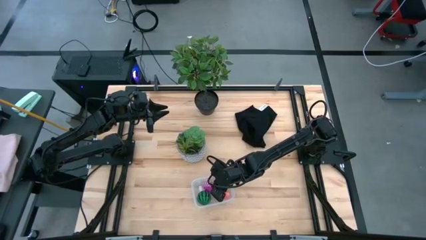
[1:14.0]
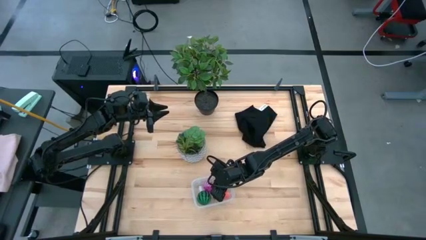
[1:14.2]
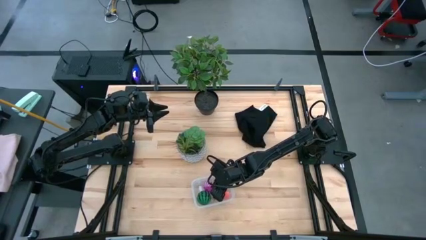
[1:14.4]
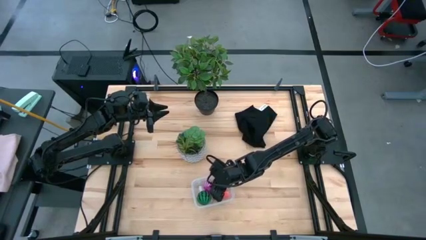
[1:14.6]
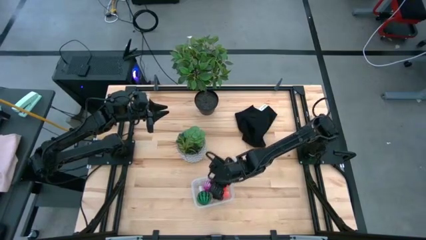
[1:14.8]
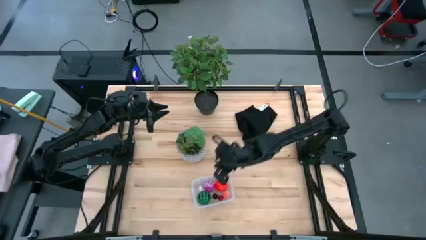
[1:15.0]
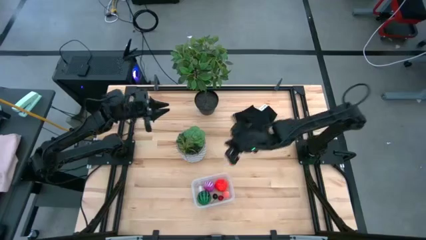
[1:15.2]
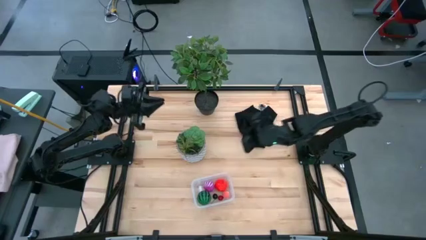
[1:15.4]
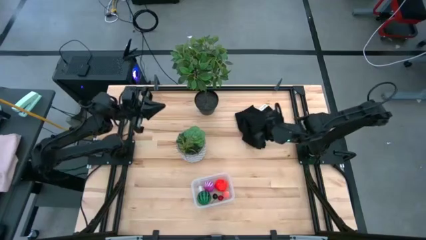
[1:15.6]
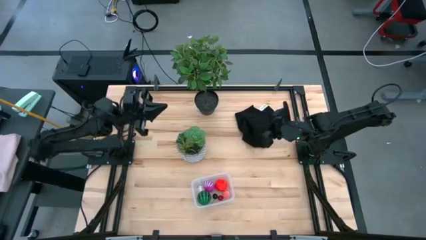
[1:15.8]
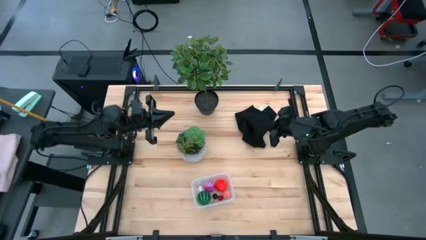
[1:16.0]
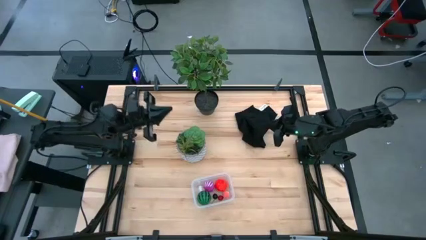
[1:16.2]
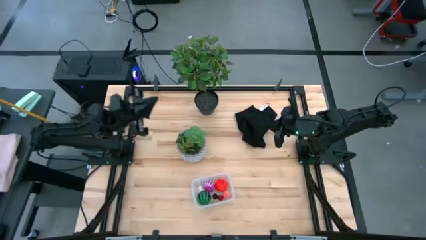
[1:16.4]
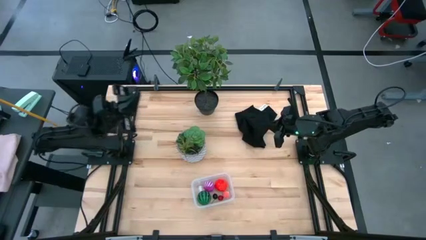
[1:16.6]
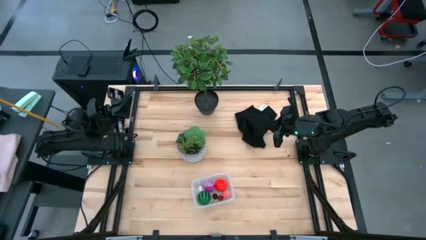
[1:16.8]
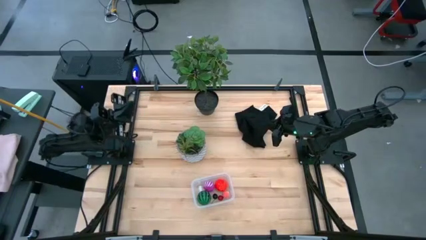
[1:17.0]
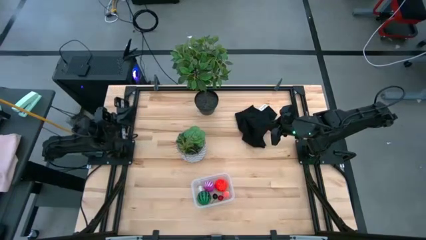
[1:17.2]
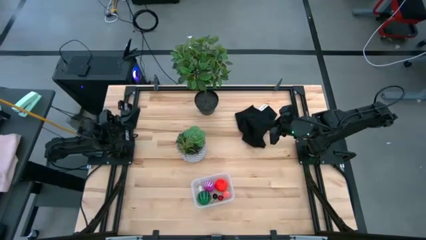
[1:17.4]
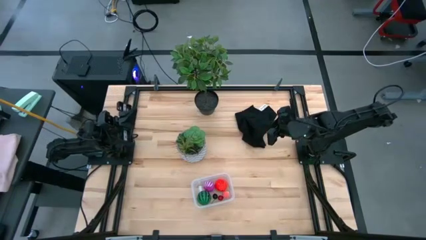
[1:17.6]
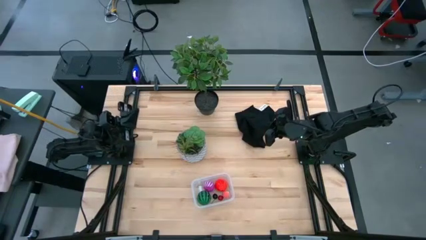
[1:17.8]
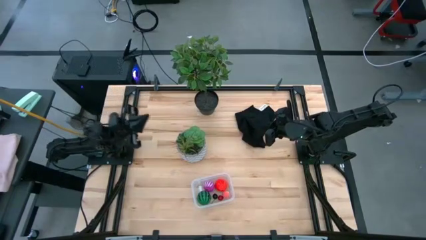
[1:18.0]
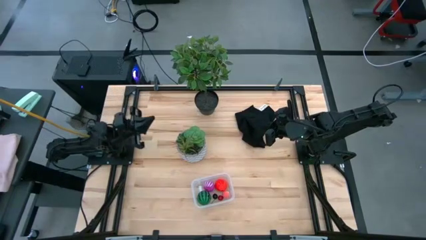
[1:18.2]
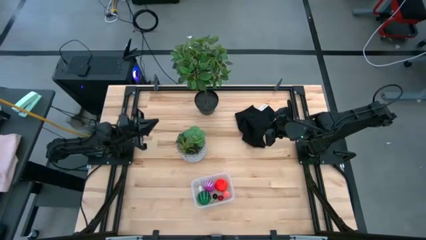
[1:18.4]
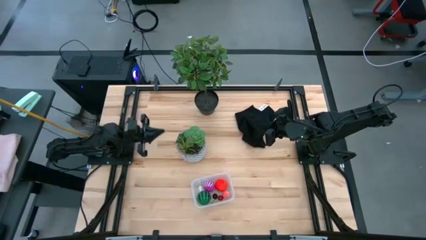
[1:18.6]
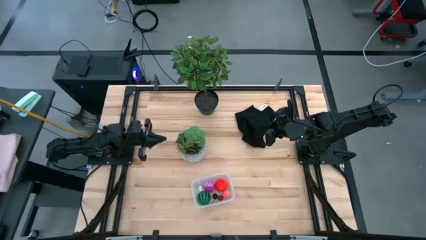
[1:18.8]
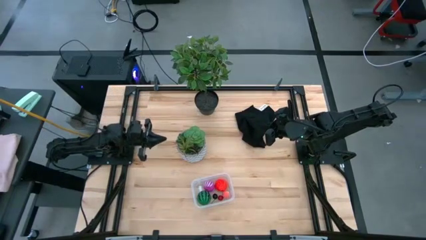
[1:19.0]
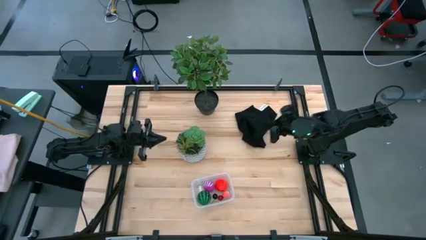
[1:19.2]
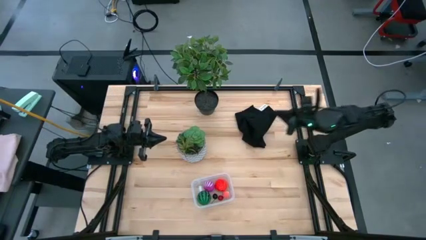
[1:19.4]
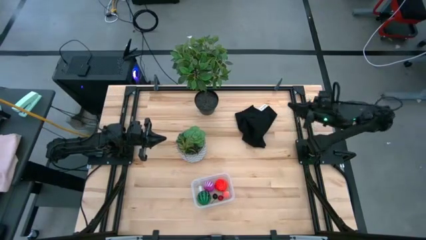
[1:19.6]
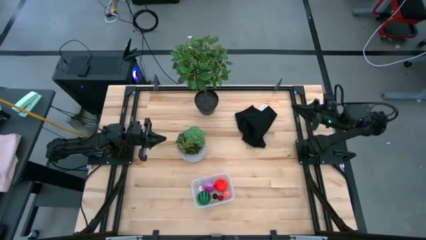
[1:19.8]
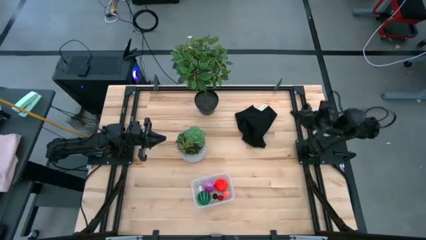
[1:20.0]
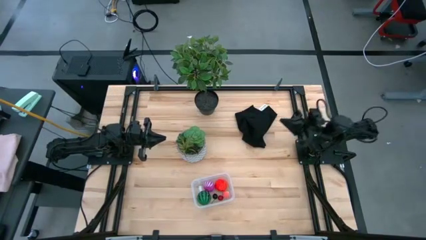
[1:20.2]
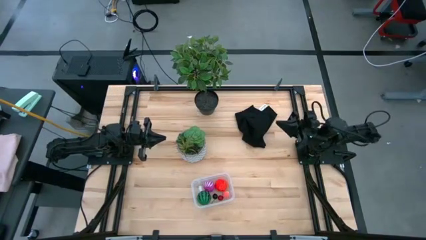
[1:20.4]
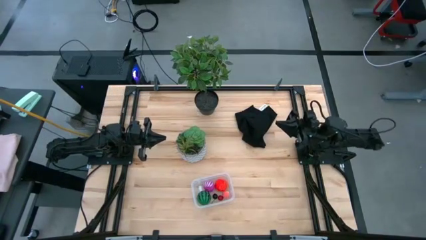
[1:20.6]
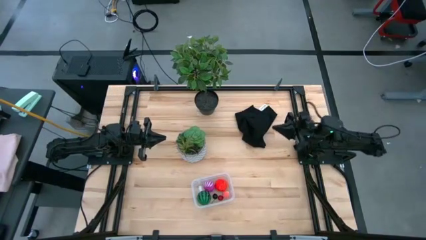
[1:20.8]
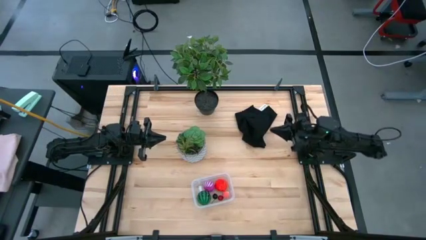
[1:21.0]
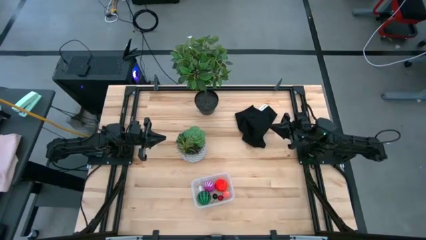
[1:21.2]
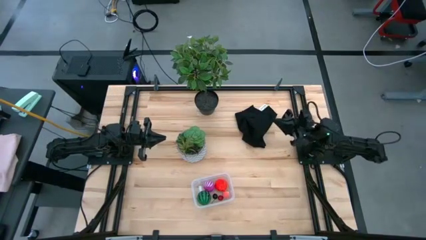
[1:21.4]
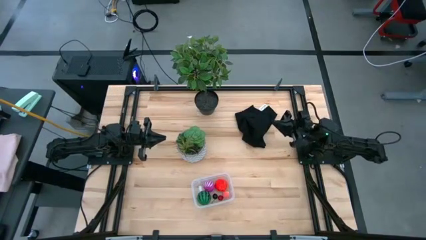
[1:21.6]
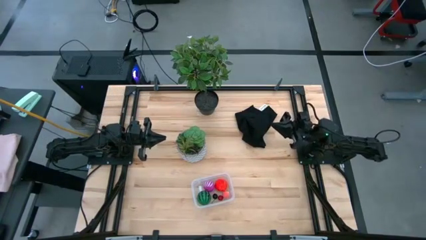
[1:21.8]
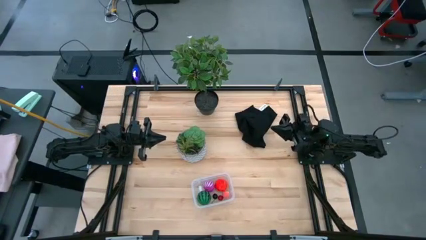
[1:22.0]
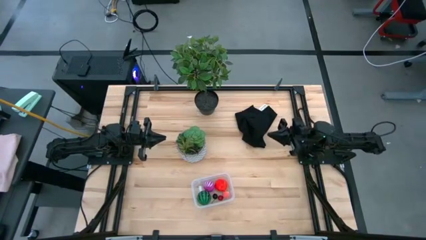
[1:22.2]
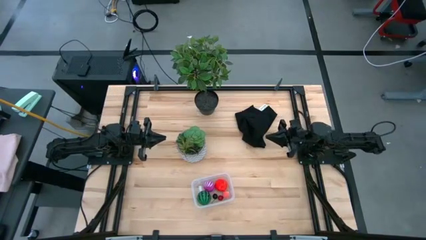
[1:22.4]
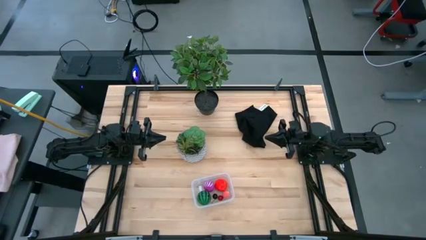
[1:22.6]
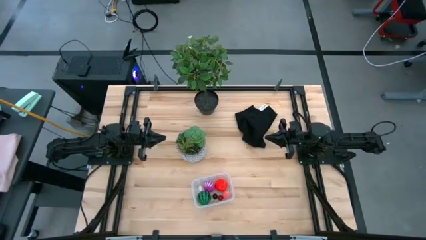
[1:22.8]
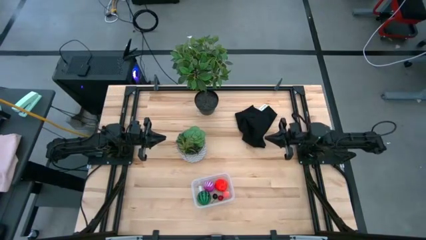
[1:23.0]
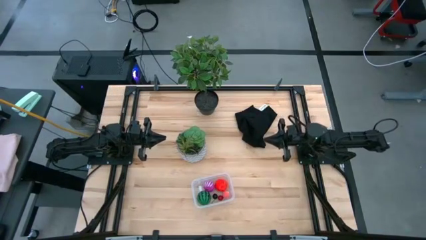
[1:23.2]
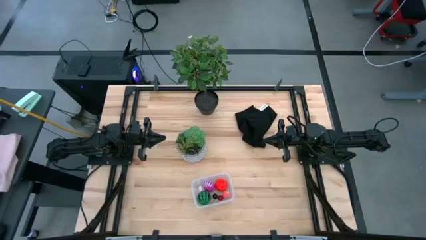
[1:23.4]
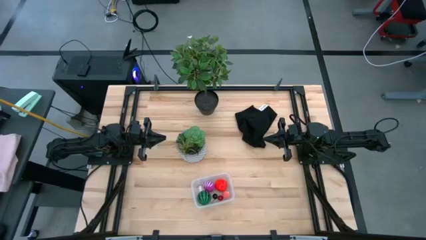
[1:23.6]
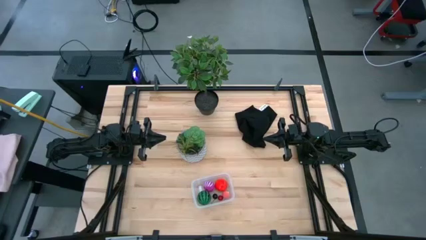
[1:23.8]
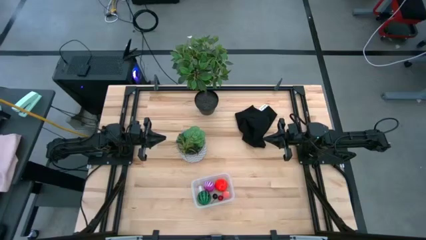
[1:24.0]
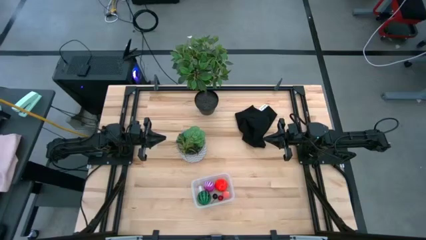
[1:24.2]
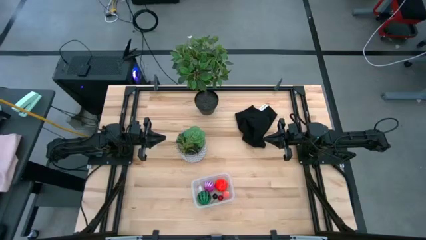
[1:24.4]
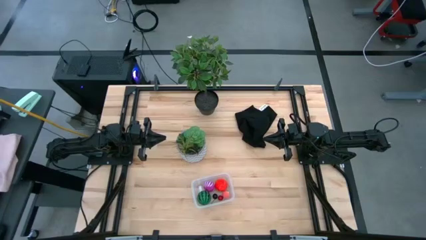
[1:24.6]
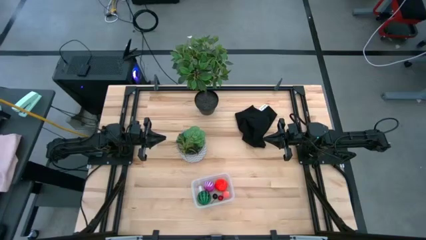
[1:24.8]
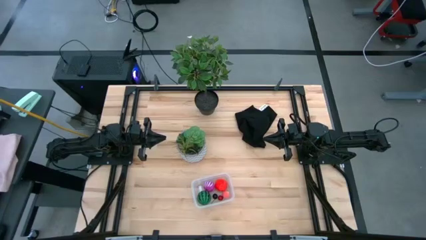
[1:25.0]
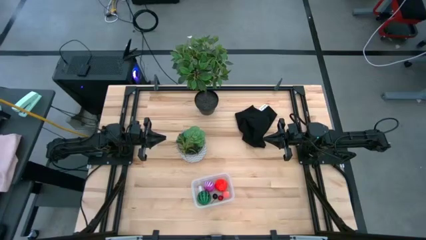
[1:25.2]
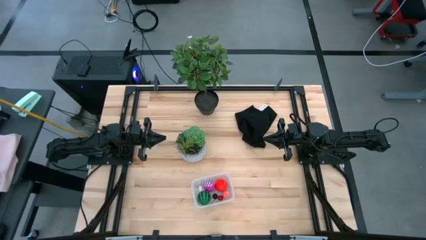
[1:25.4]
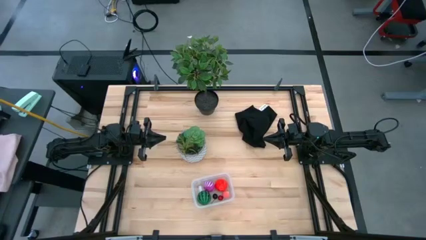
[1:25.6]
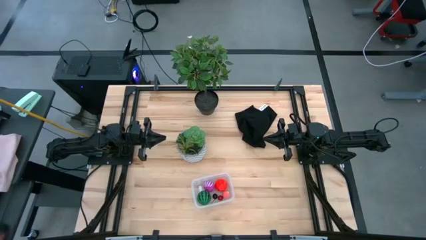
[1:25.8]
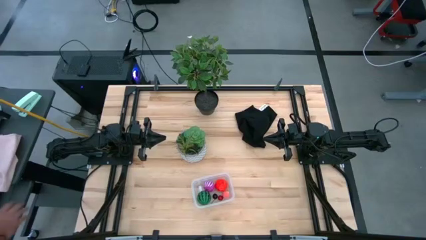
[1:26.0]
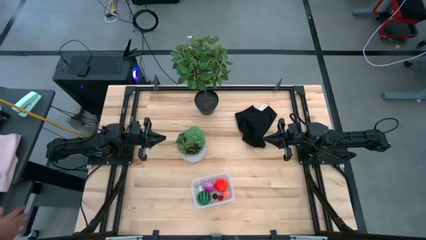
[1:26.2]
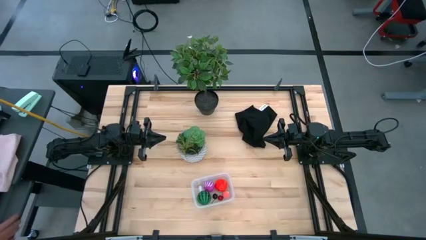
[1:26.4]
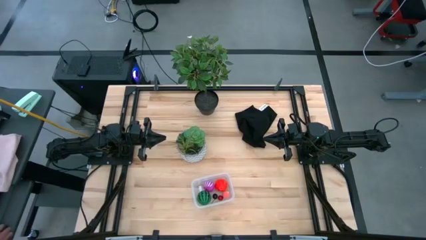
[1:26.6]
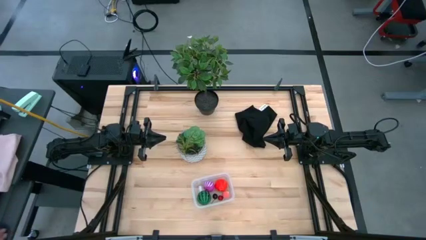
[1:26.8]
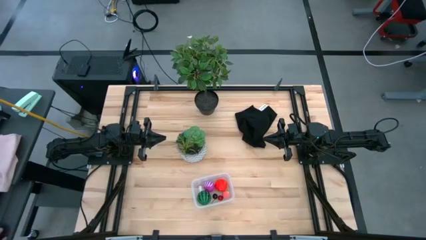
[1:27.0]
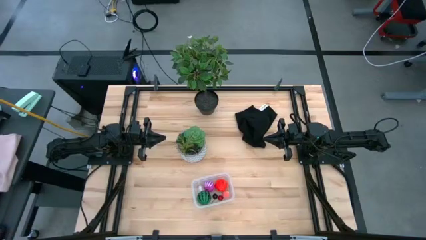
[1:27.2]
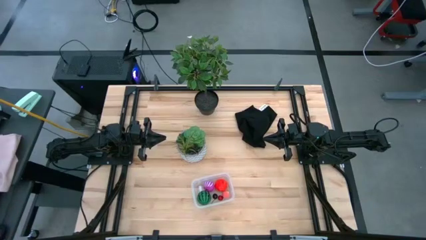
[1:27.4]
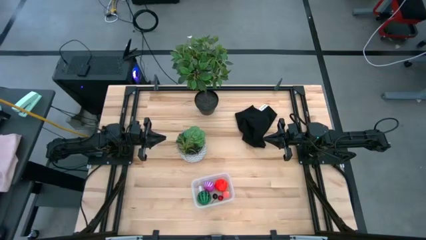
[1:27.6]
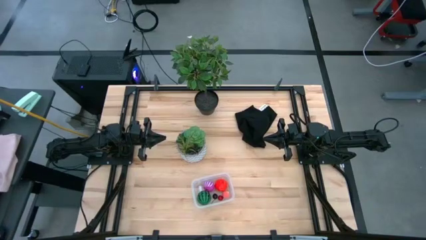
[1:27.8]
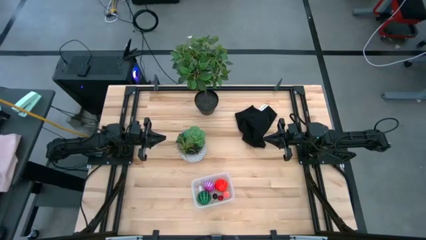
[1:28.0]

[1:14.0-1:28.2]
Task: Pick and placing Produce into tupperware
Return to Home Position
